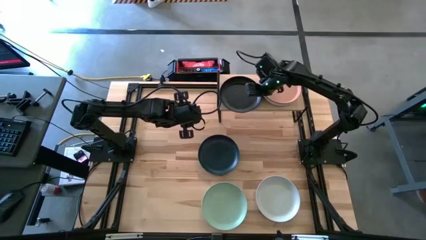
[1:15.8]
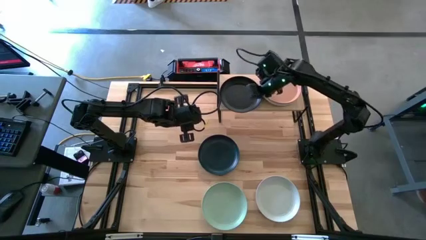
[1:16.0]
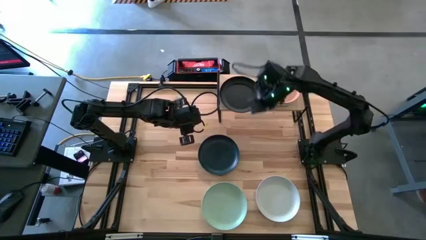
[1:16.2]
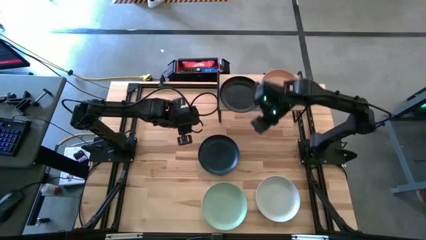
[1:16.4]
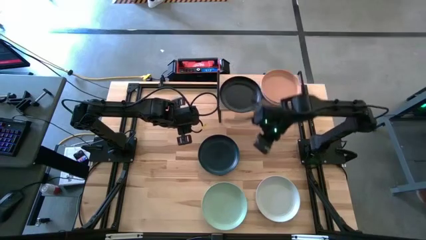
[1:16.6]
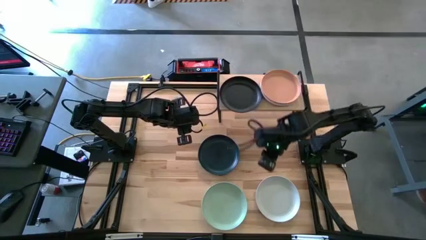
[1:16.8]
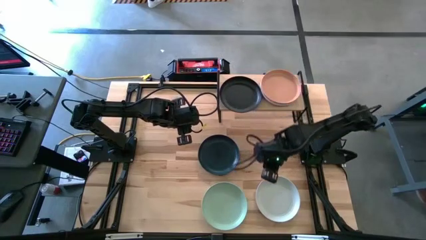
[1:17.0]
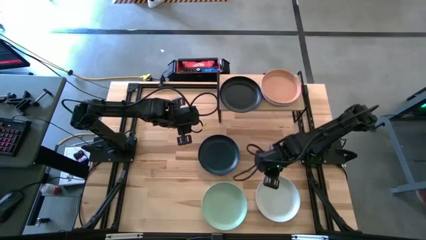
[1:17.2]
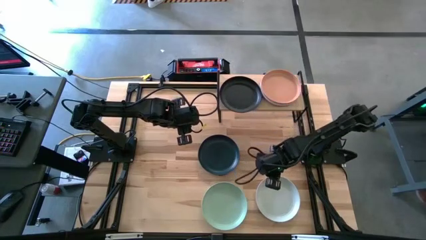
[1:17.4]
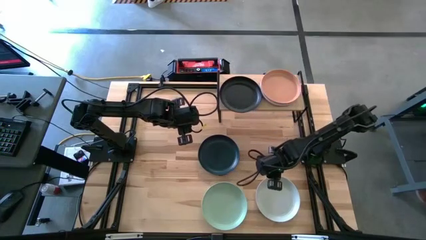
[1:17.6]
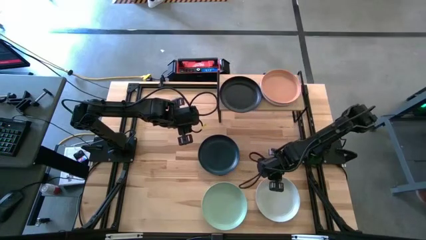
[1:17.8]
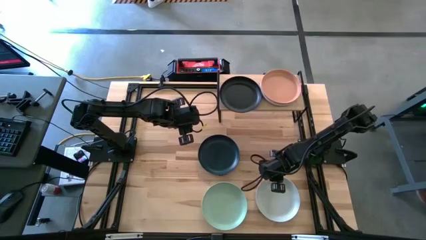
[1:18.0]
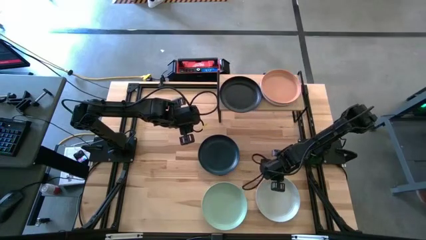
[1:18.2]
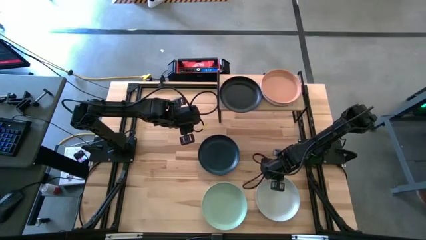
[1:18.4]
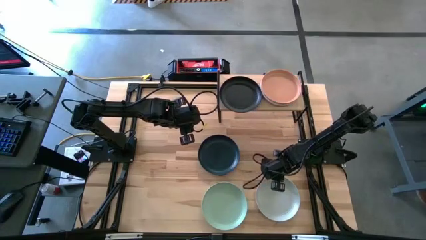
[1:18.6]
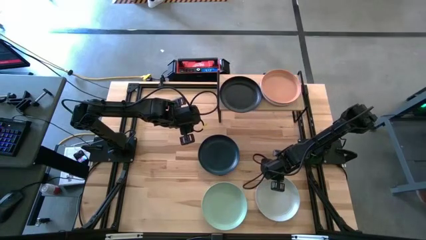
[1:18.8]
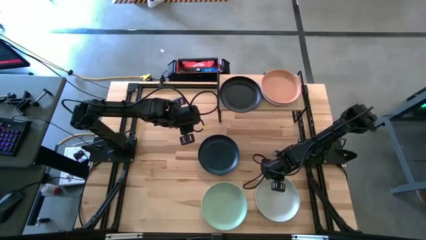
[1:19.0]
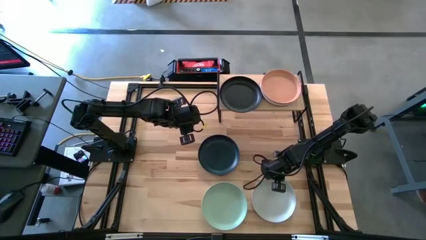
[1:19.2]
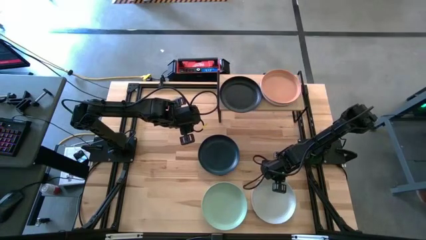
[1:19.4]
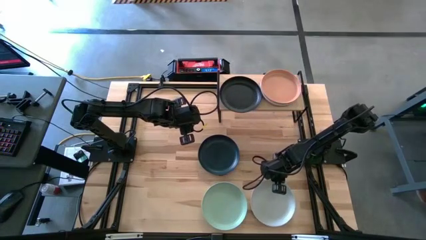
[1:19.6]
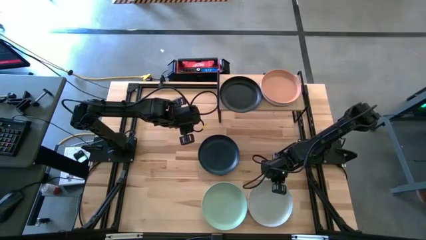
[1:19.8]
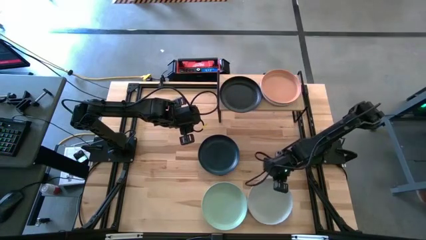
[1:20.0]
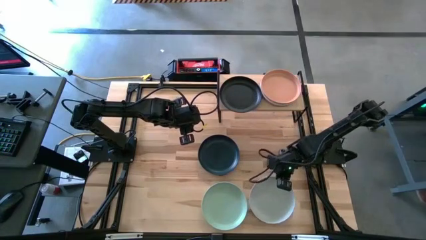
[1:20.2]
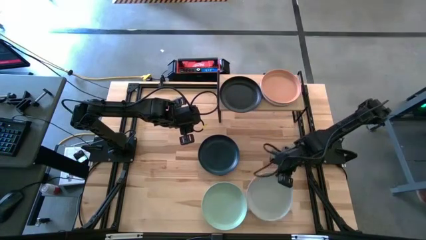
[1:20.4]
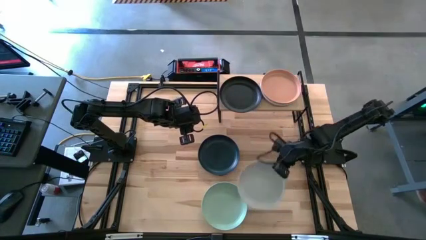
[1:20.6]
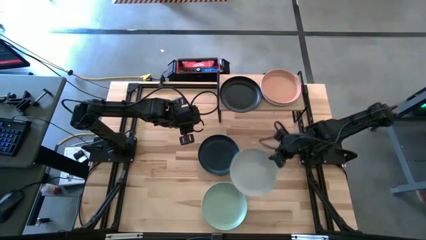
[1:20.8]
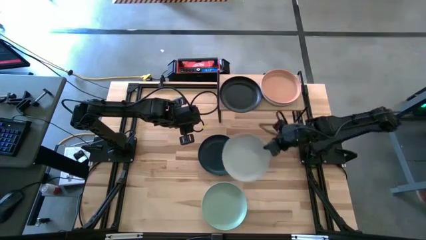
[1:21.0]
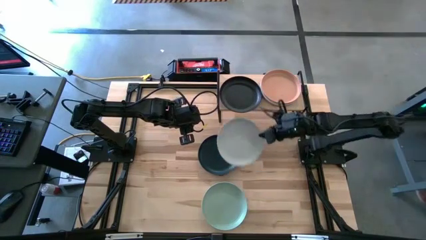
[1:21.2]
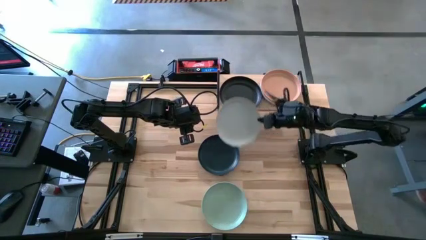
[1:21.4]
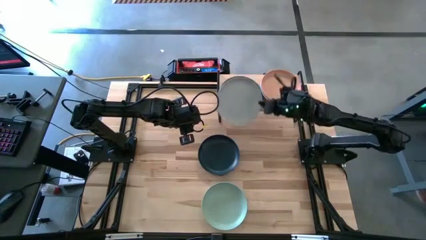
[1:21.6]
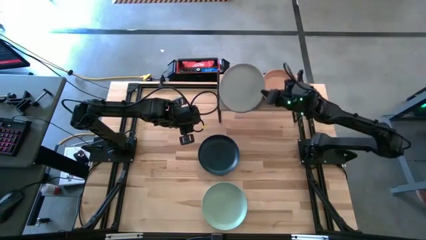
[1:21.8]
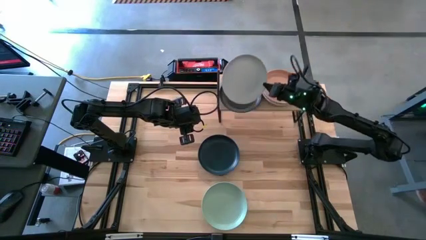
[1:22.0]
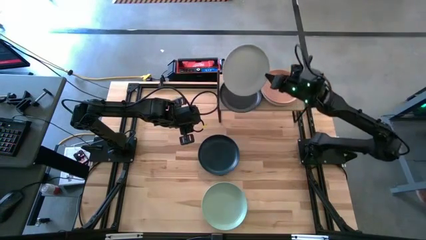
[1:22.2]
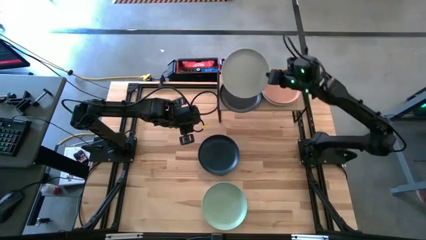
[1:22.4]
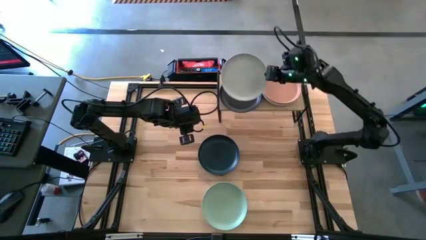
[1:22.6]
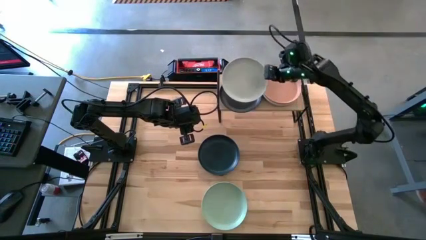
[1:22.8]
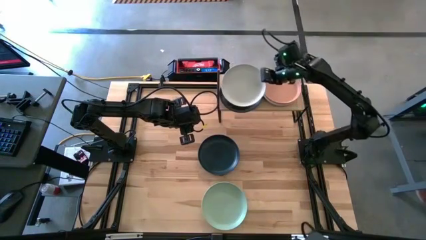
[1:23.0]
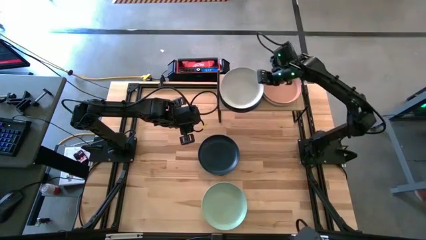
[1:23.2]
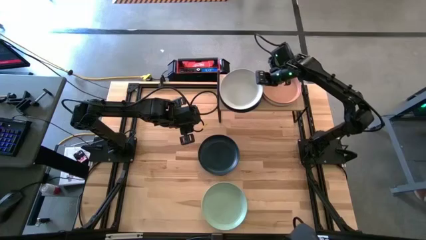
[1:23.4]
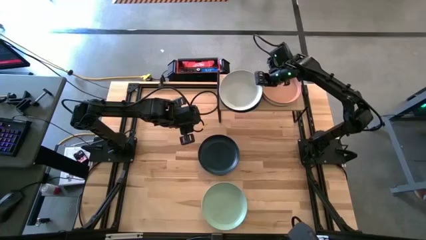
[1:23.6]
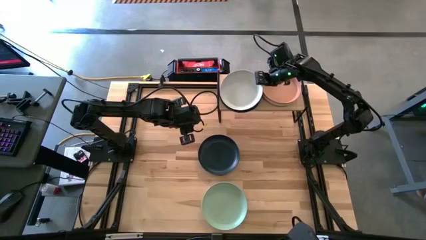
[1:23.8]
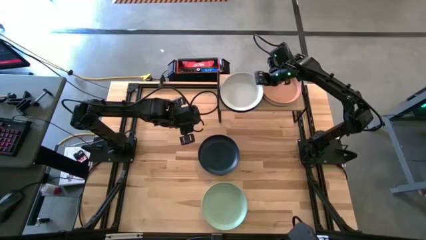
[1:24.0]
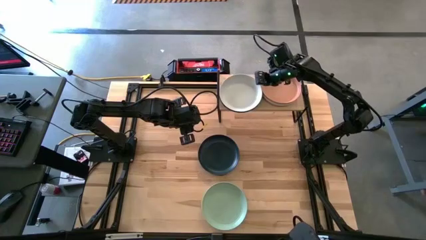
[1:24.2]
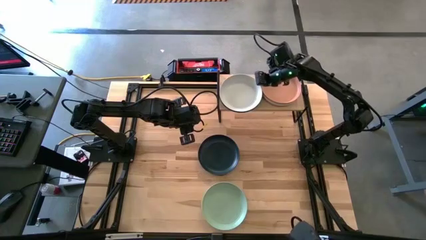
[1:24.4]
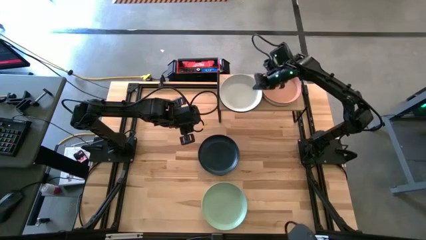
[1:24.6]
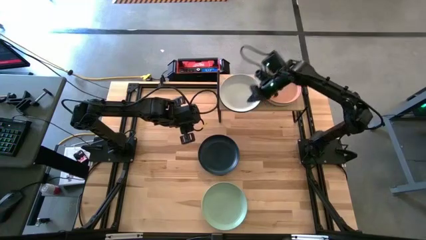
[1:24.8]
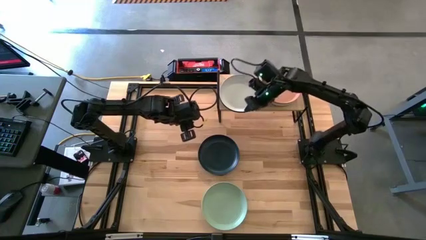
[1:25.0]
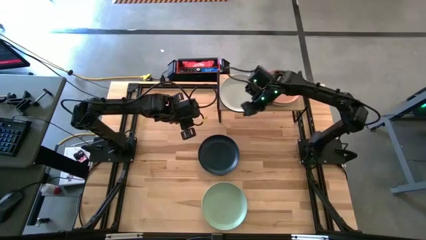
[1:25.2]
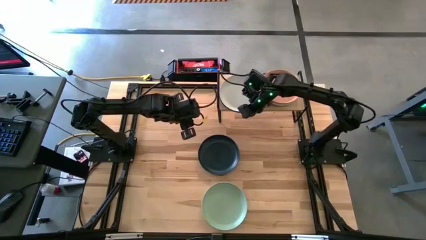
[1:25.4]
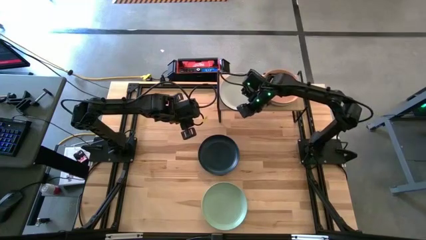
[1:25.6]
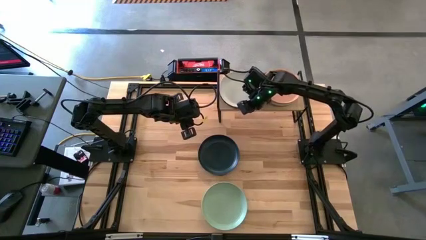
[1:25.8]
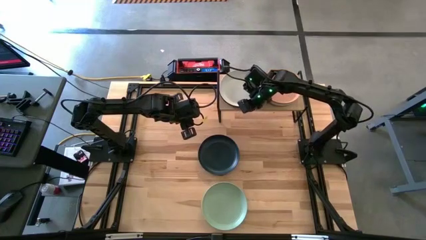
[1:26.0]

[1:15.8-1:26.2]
Task: Place and stack plates onto a shelf
Stack the gray plate on top of the black plate on the shelf

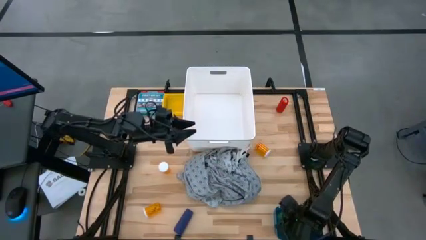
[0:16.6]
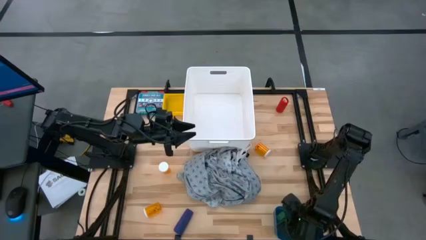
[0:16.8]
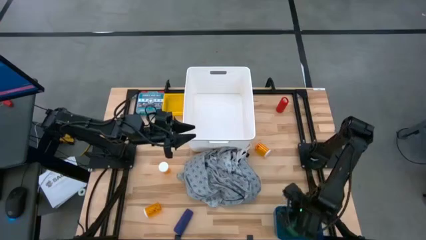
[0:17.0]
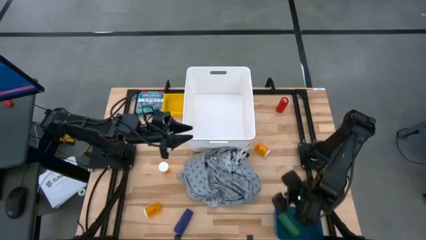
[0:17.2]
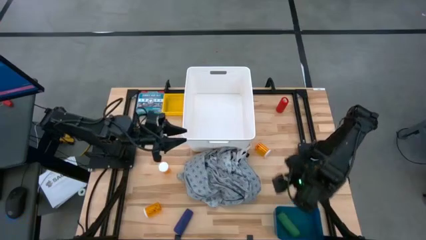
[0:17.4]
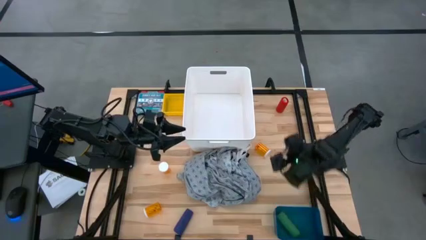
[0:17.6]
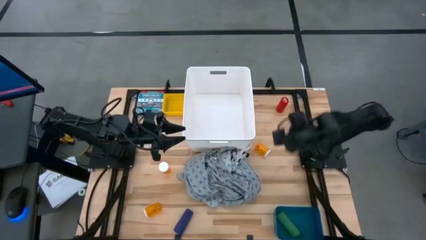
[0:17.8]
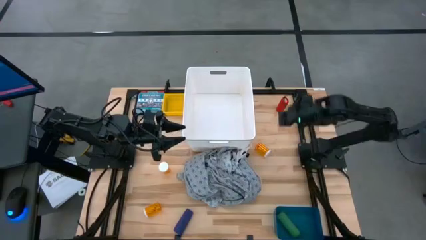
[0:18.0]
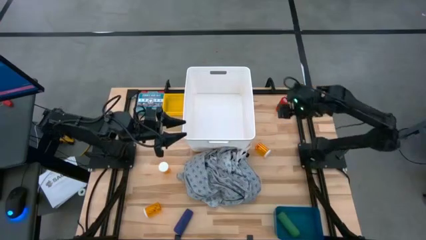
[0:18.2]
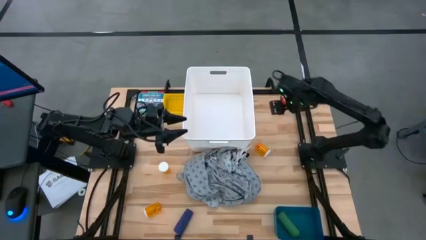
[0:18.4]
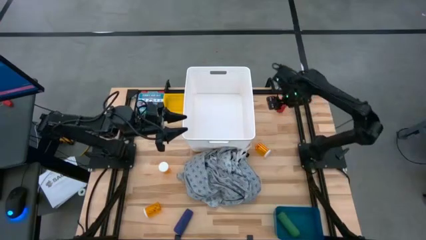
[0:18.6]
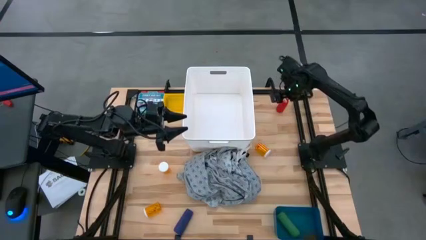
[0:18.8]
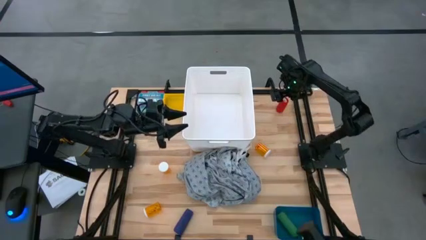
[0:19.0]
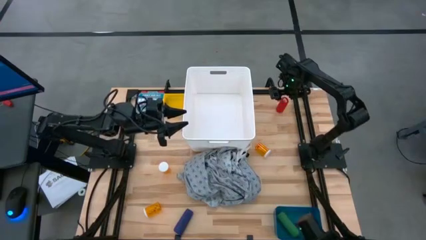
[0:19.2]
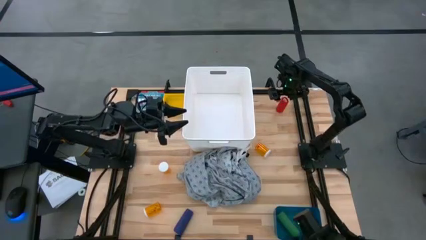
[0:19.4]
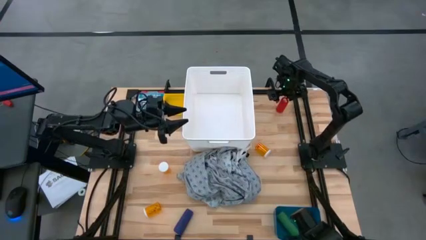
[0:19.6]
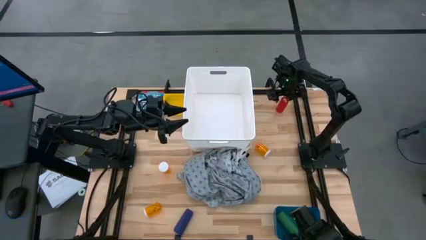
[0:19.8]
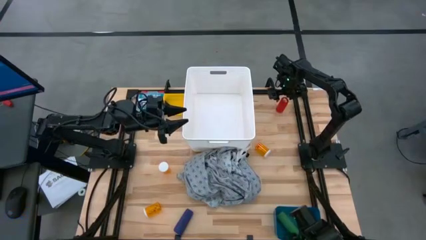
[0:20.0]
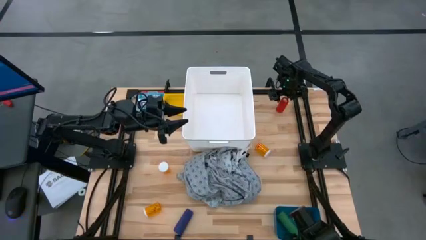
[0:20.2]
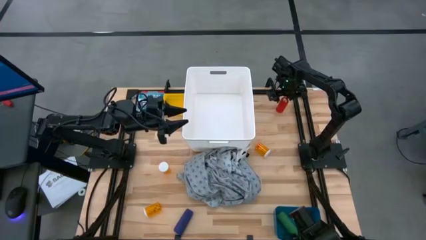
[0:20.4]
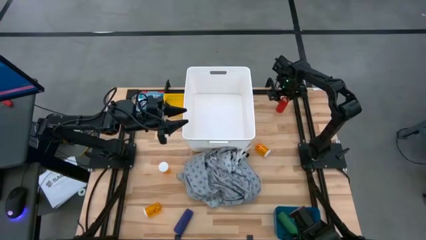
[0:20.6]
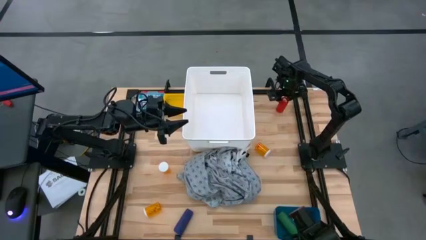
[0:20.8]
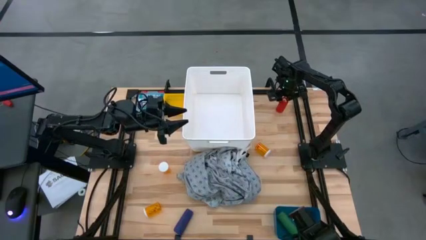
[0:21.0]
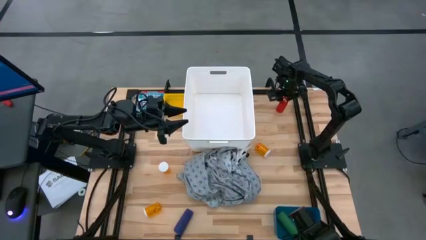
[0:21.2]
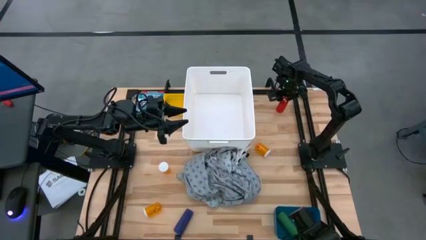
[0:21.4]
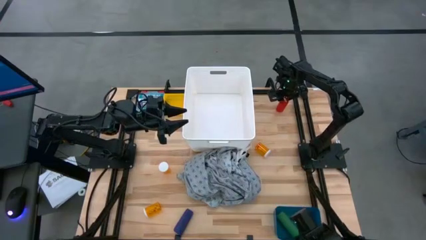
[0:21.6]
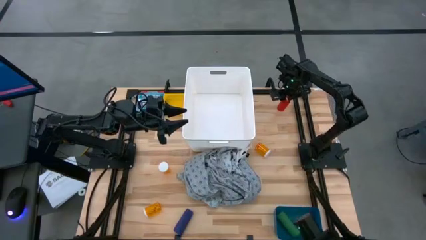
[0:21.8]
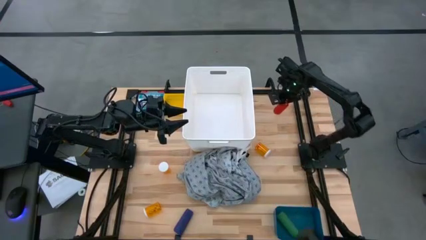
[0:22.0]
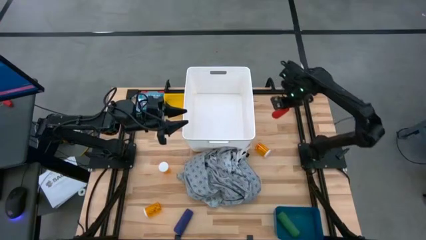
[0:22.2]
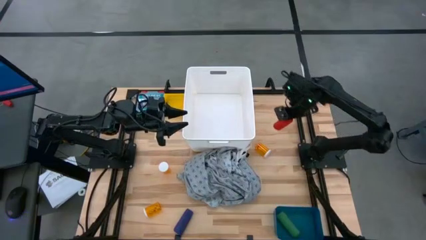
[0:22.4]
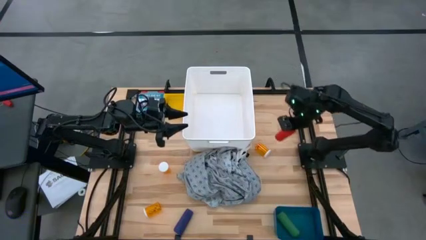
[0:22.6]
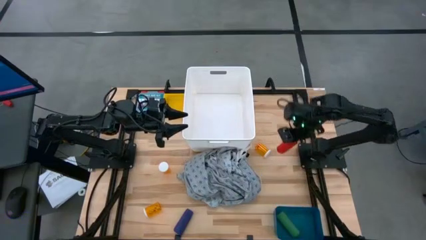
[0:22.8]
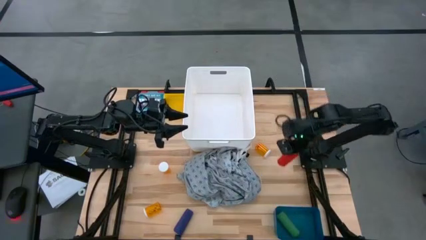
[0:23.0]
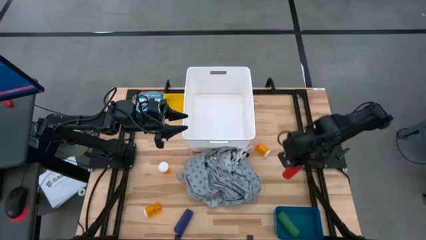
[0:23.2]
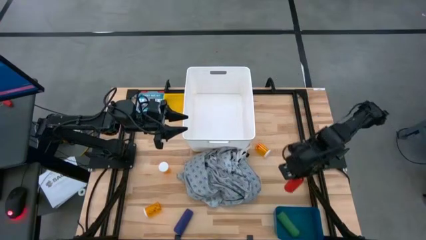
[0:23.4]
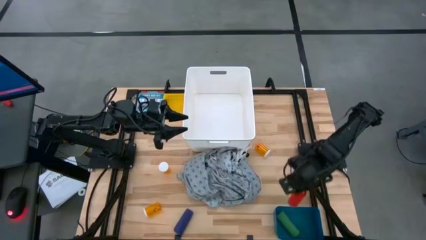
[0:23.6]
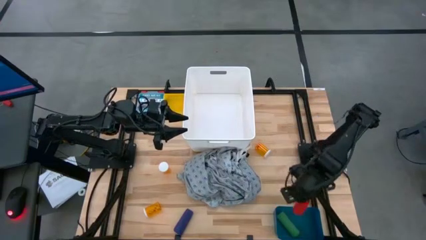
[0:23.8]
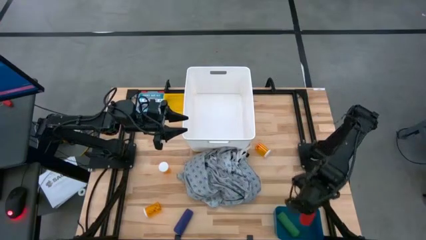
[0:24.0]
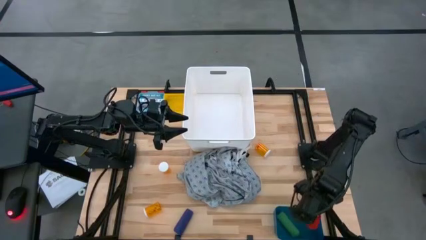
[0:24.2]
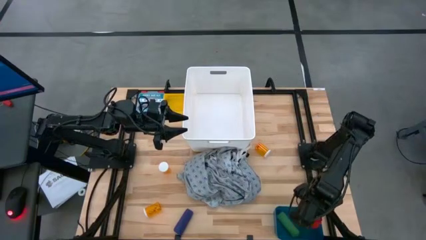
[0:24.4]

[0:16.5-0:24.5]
Task: Pick & place medical supplies in basket/bin
Put the red bandage into the blue bin
